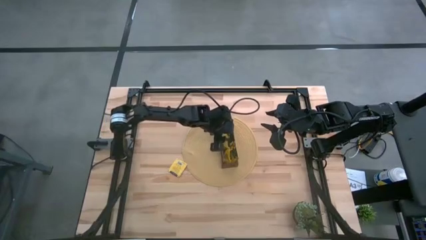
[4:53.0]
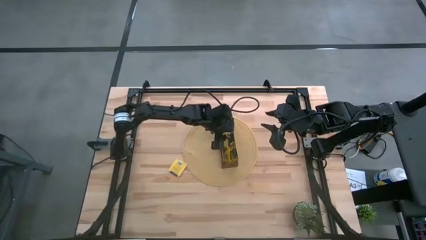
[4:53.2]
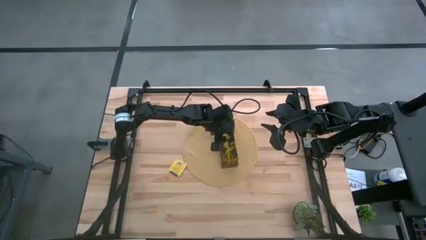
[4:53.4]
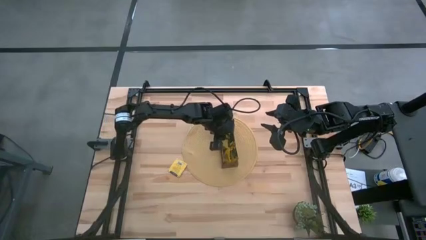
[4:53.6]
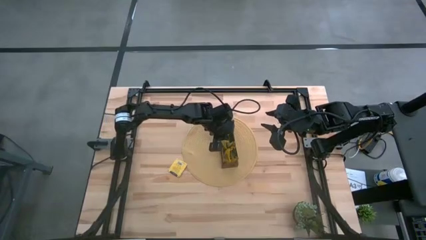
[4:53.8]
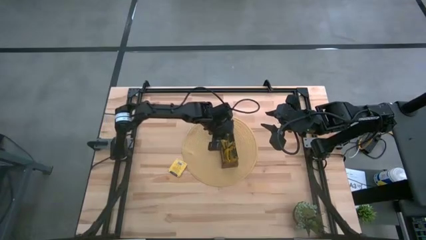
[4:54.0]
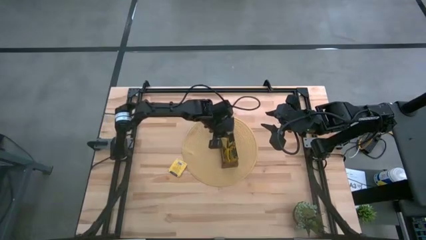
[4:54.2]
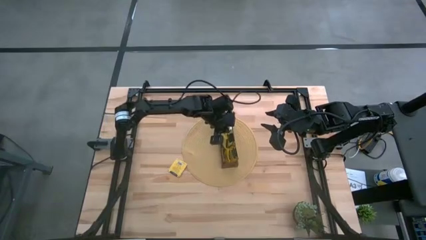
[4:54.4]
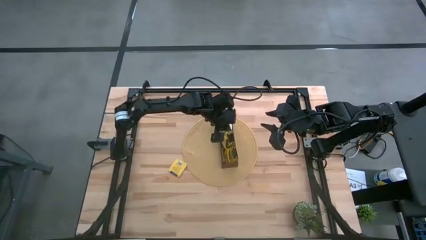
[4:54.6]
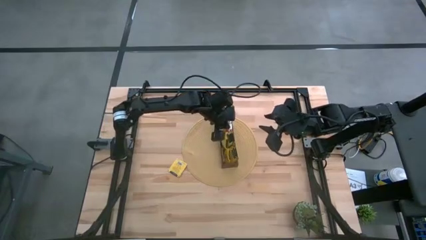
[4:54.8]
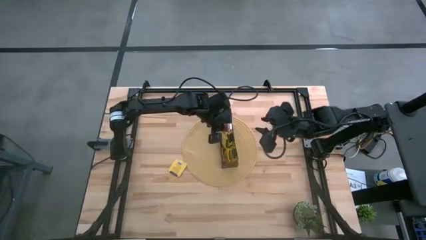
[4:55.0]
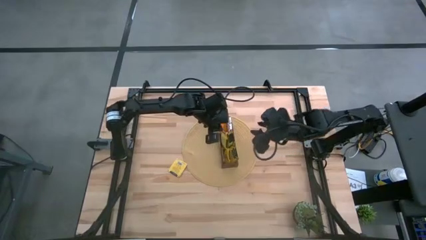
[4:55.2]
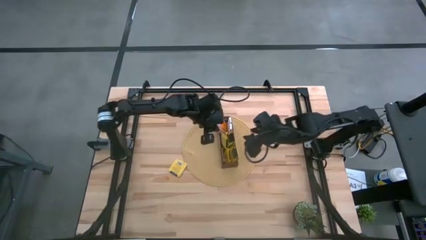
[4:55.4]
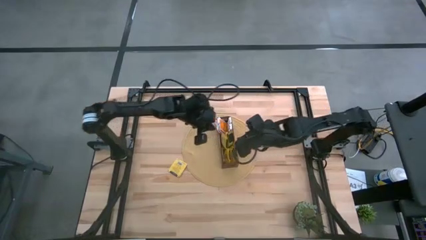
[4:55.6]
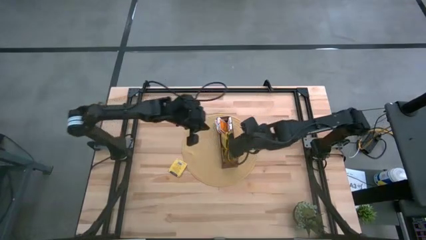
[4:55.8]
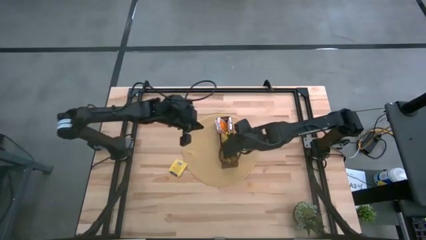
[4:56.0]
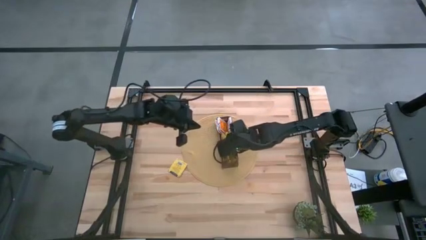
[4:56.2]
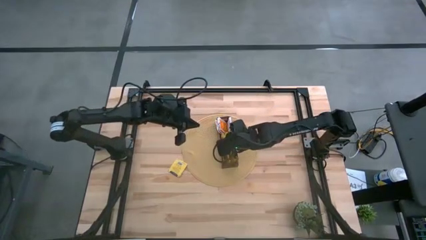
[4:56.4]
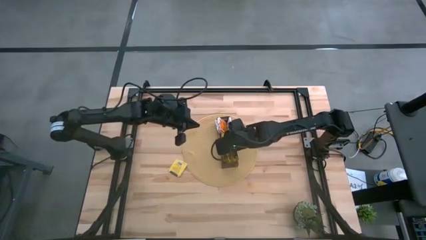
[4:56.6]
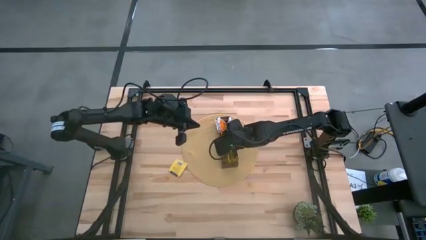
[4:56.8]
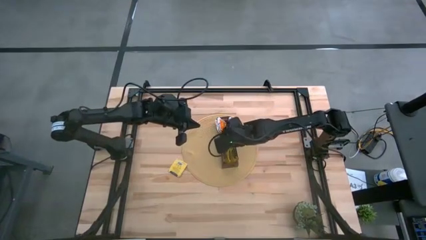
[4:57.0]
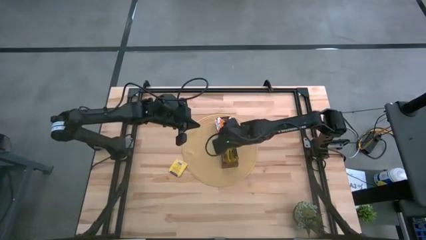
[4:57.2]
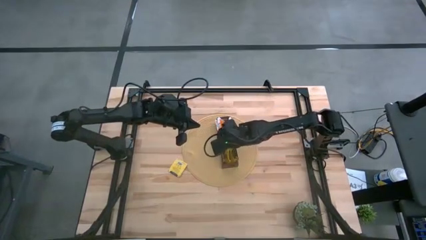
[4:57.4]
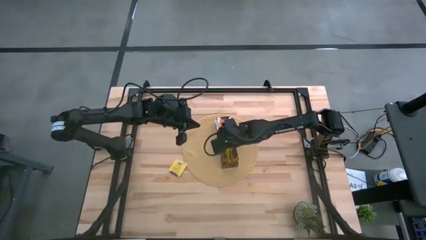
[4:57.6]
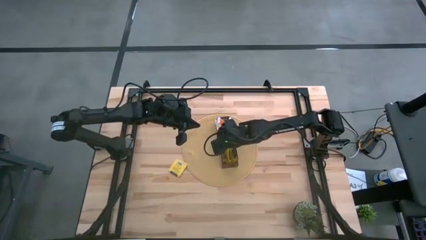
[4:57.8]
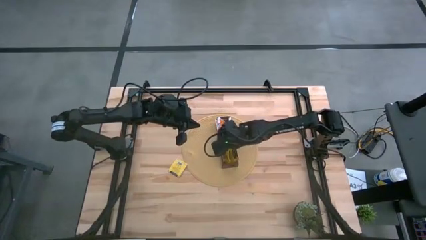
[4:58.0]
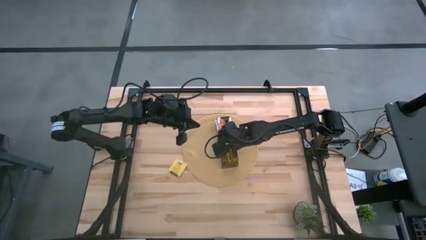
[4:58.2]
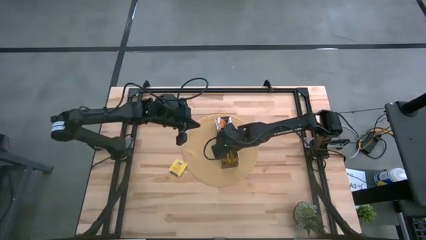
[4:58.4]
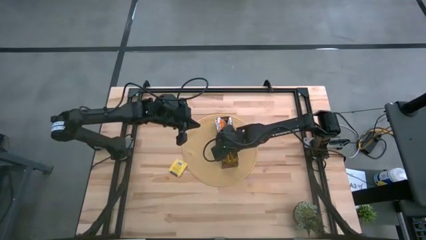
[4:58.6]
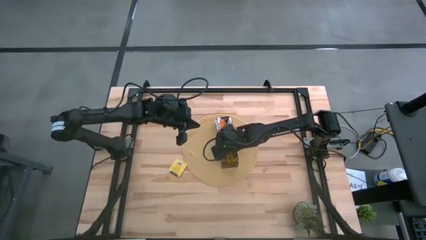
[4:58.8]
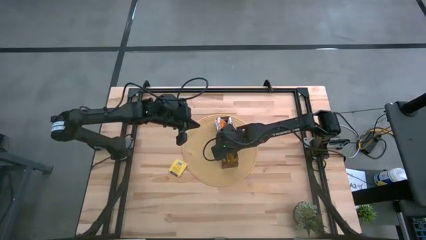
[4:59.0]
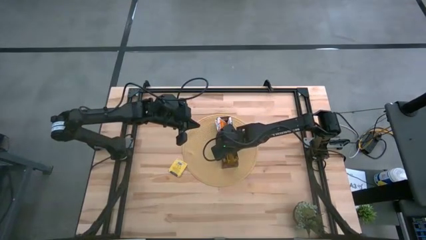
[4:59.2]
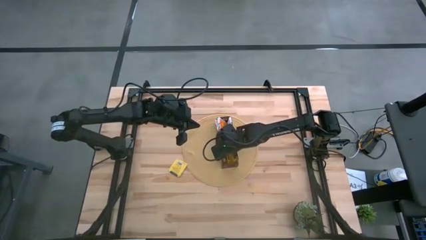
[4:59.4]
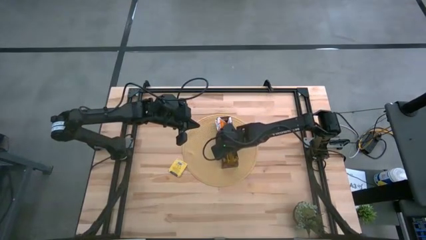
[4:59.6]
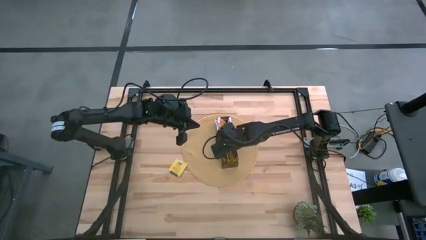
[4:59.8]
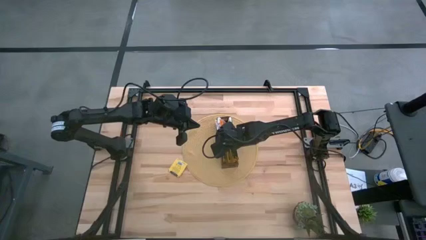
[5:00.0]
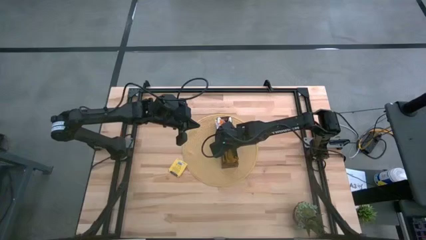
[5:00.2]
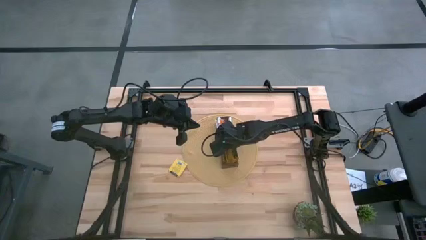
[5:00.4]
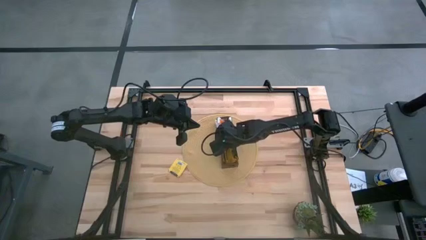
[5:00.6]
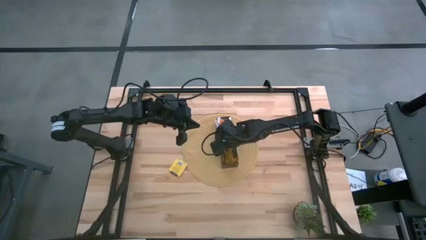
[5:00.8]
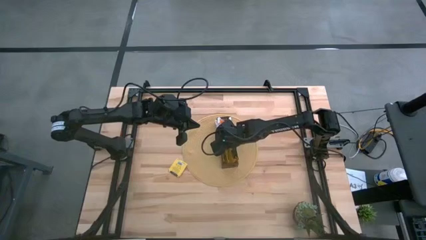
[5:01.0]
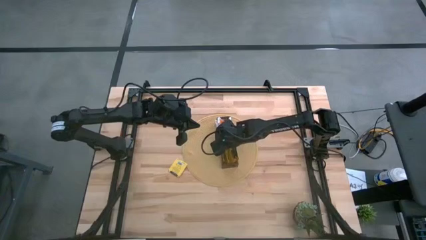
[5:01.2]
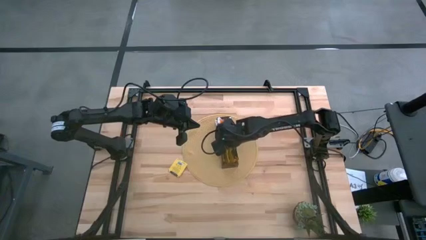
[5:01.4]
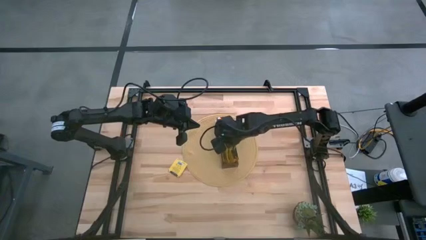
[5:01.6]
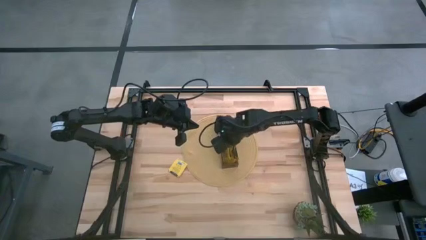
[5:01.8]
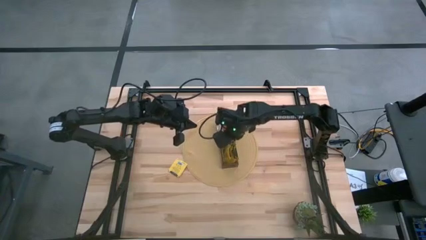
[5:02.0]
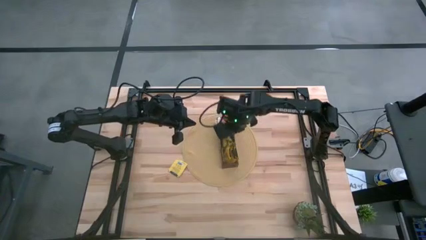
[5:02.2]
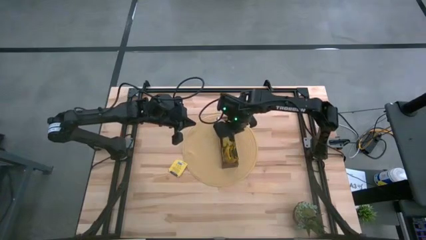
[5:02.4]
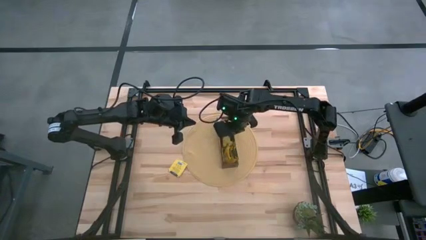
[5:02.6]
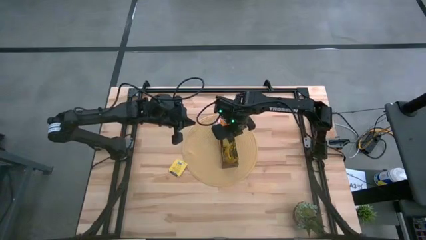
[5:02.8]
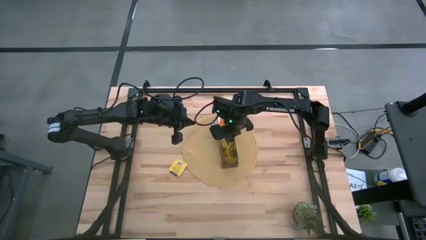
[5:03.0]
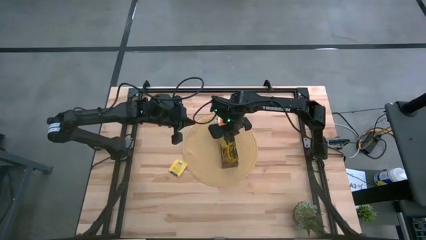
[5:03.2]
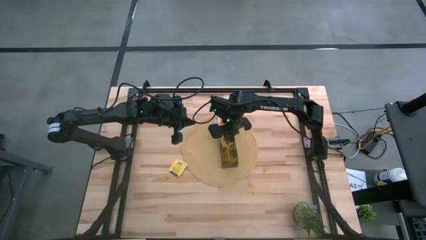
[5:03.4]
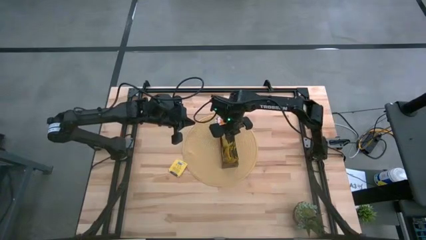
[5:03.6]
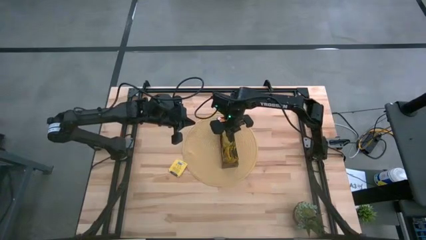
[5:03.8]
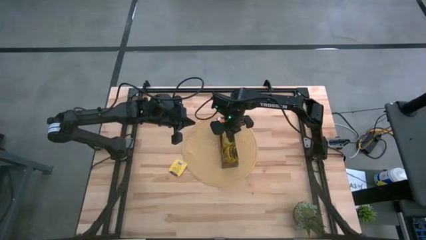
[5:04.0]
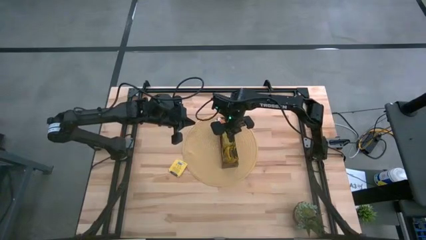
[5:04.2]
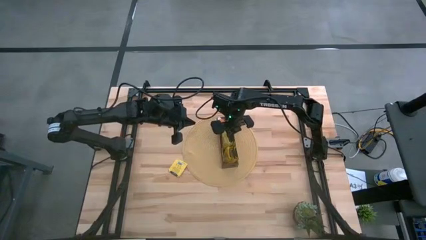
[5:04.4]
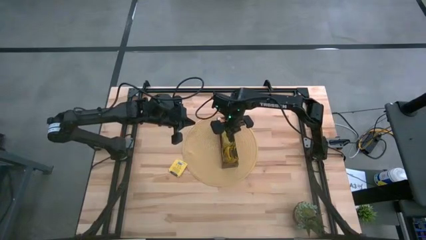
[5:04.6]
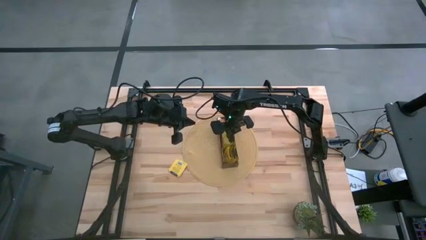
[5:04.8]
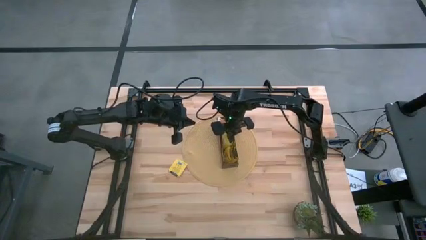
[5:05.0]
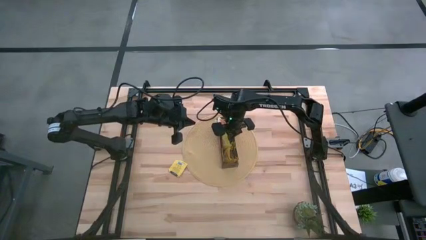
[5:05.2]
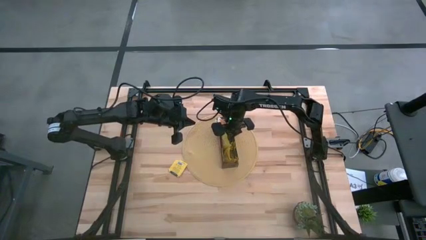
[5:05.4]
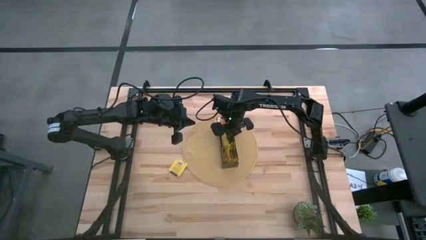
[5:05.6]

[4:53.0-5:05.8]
Task: Pick & Place Tea
Put the right yellow tea bag into the middle section of the wooden organizer

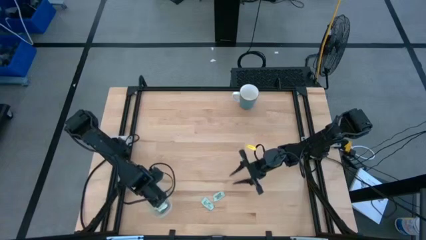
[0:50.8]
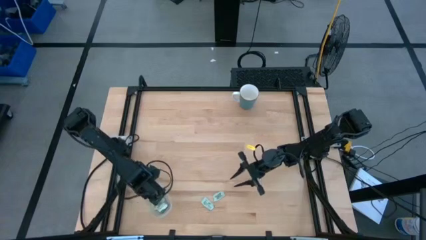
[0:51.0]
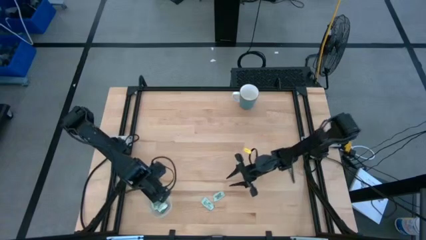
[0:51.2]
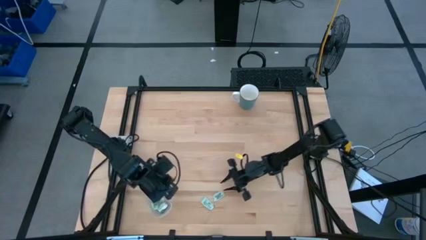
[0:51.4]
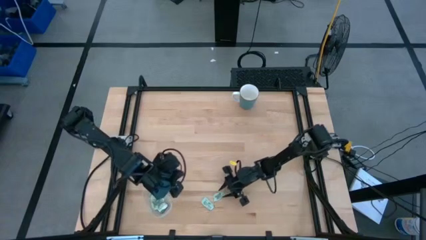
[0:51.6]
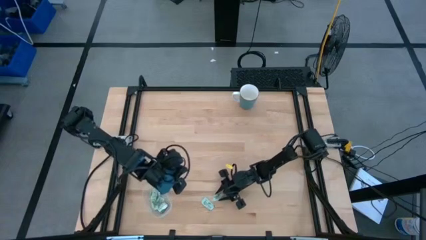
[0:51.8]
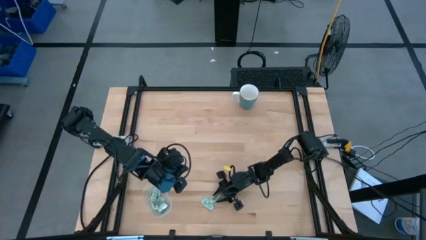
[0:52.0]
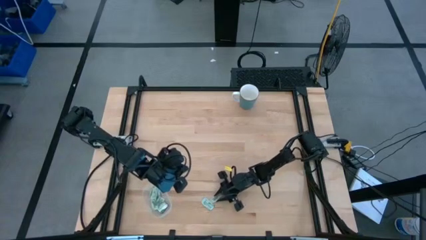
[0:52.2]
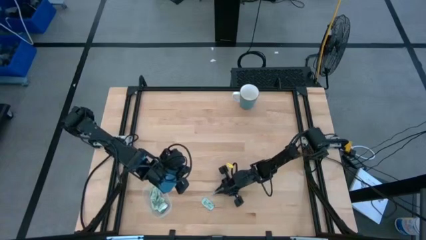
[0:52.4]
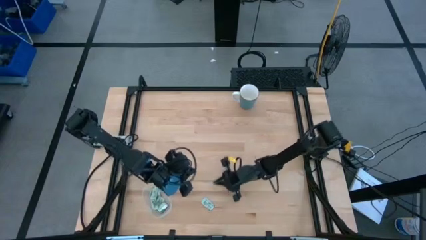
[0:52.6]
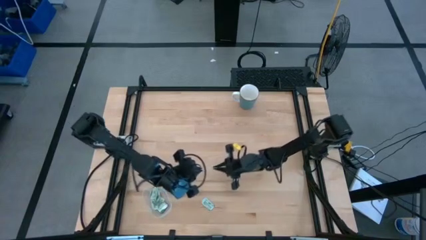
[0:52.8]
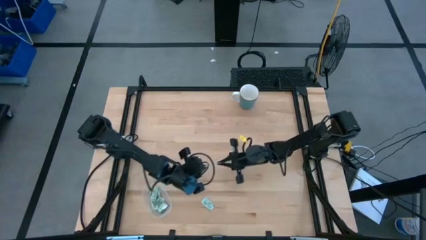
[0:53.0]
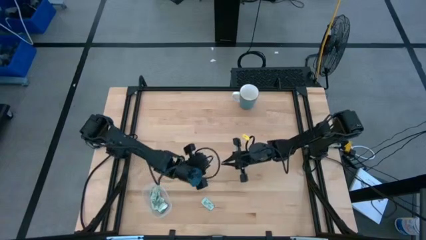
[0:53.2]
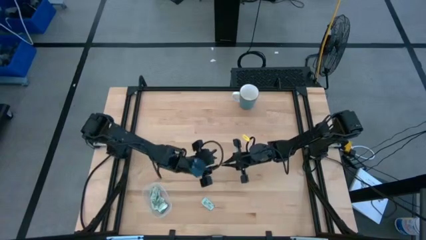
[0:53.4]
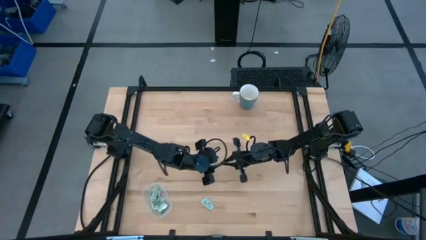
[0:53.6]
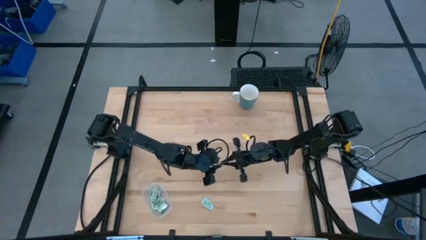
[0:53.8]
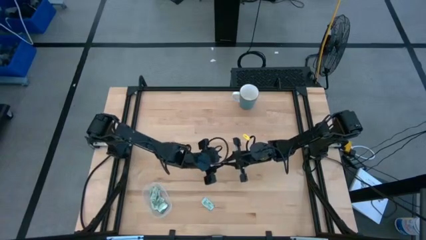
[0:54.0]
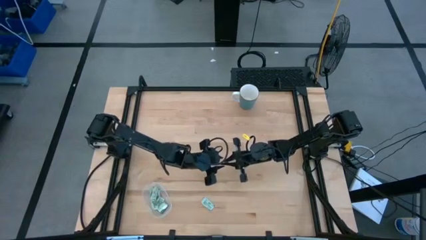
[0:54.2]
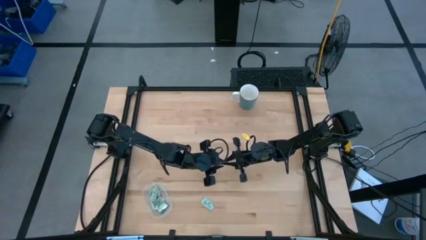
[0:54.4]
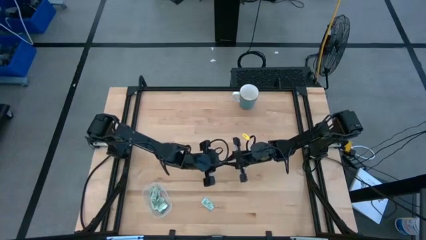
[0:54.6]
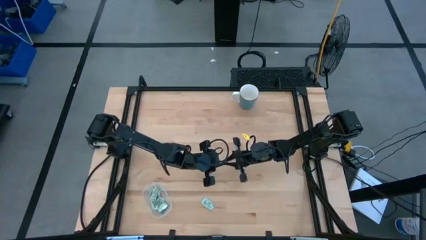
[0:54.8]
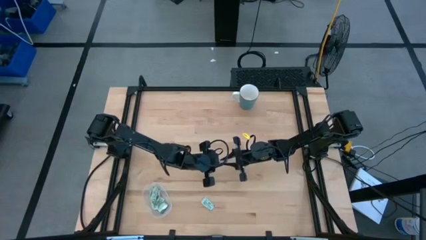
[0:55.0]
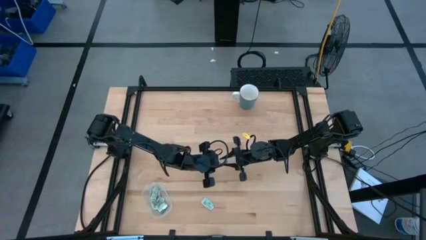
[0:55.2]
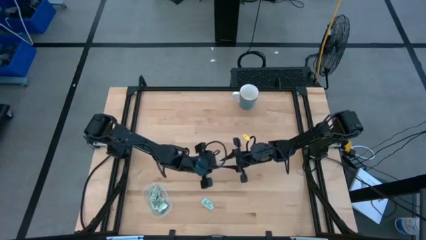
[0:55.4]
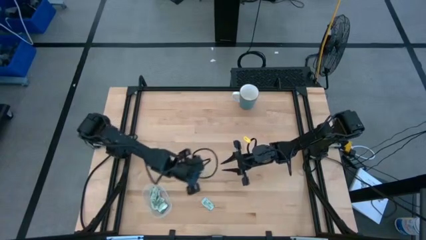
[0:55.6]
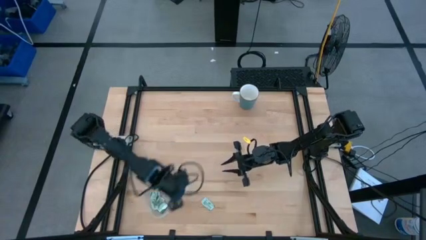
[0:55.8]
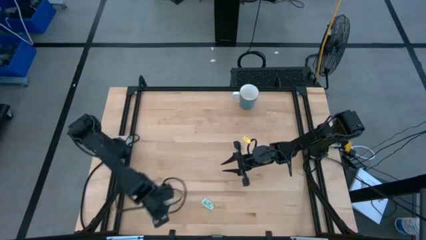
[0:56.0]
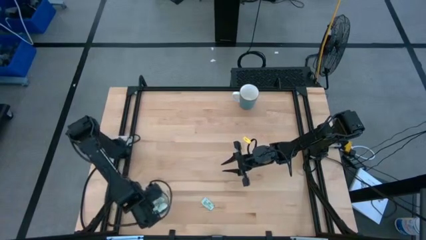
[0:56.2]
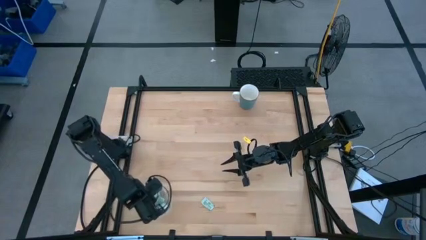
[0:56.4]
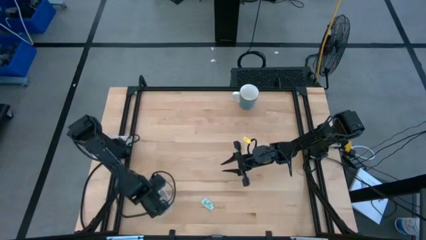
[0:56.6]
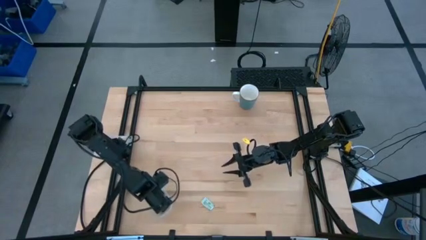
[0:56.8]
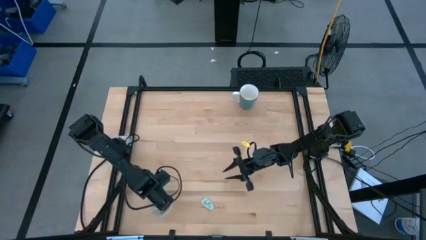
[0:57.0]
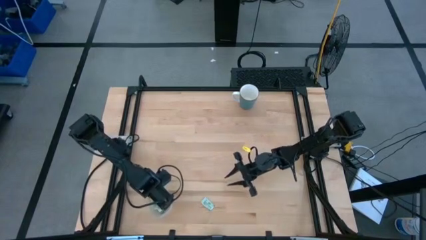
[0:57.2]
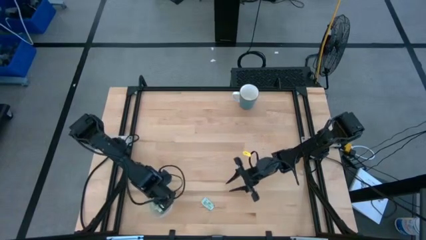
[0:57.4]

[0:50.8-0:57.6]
Task: Pick and place Stevia / Truvia into bins
Put the stevia packet into the transparent container
